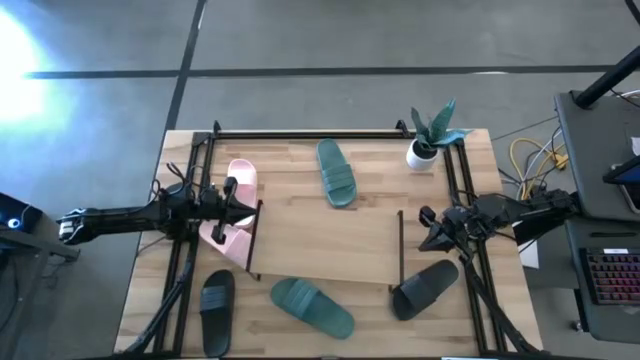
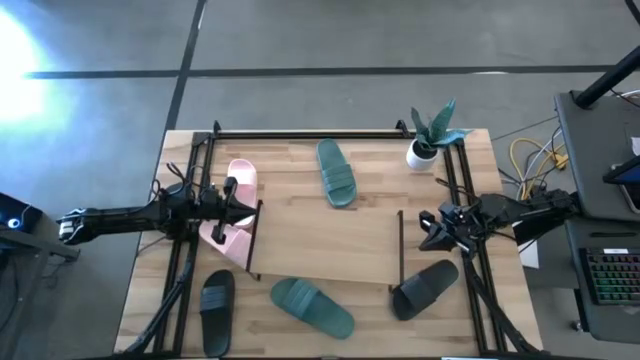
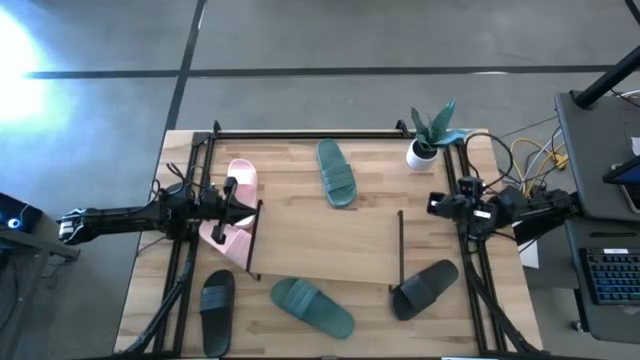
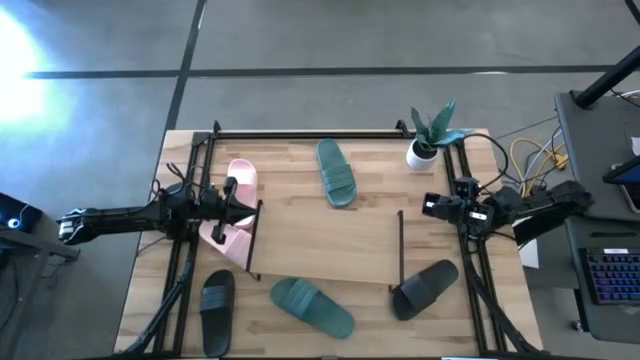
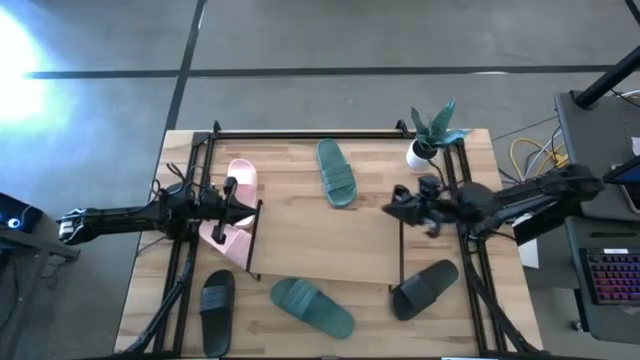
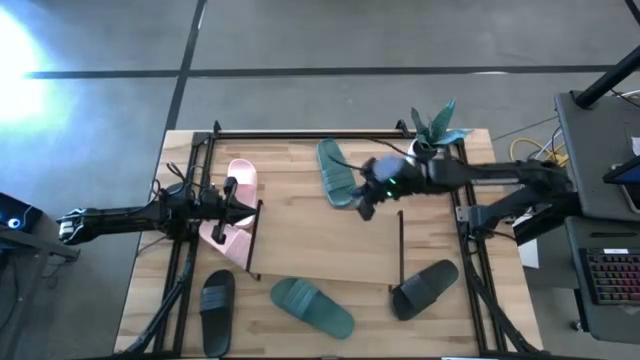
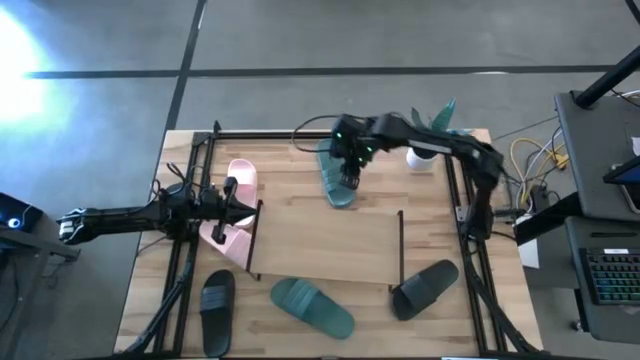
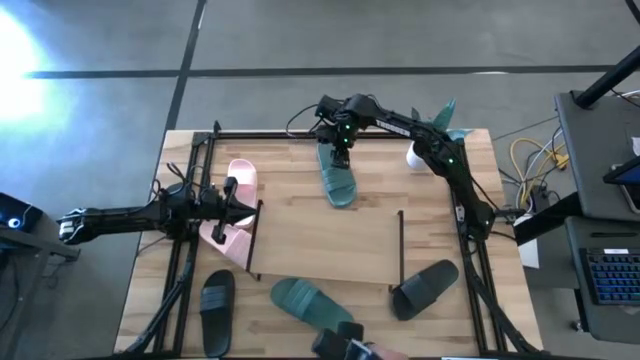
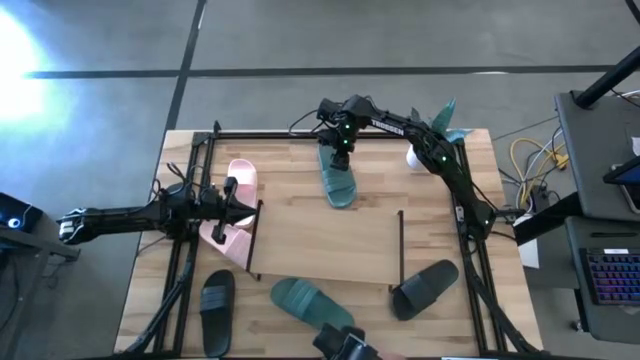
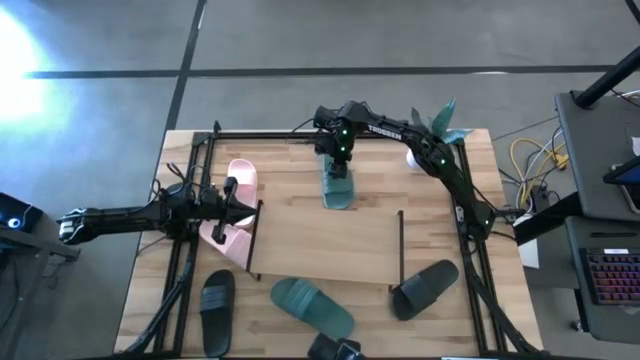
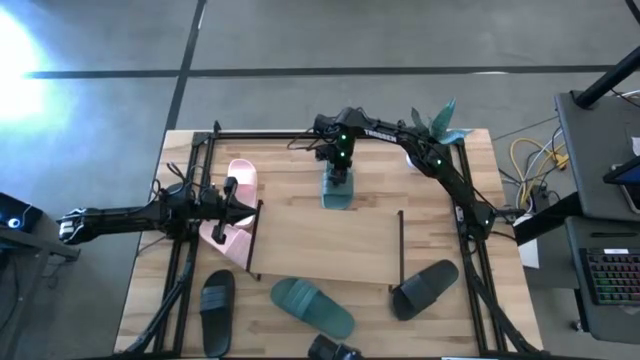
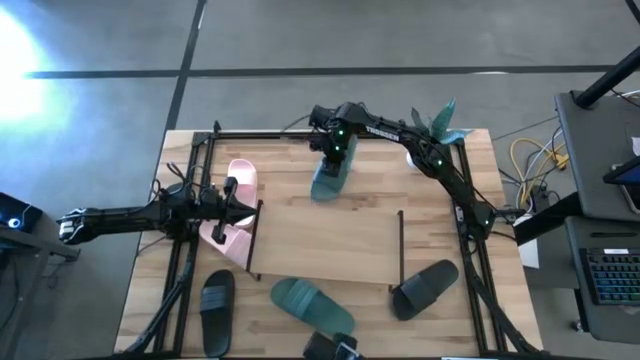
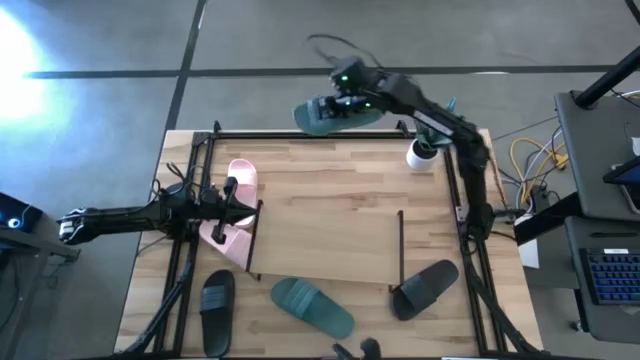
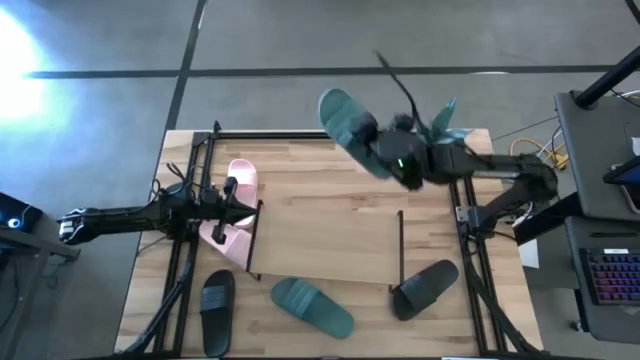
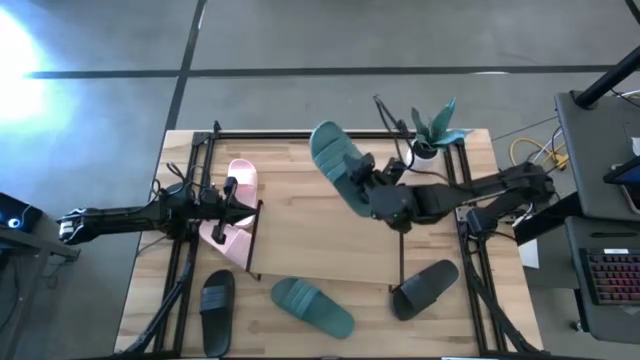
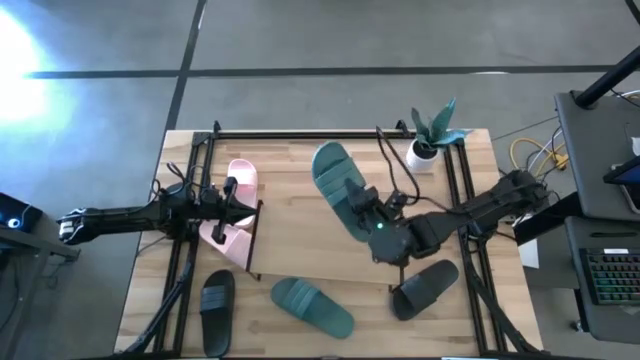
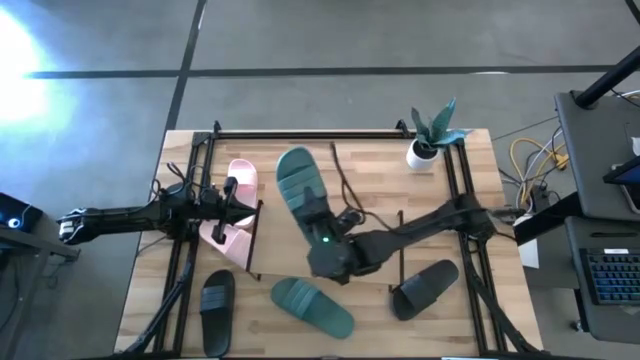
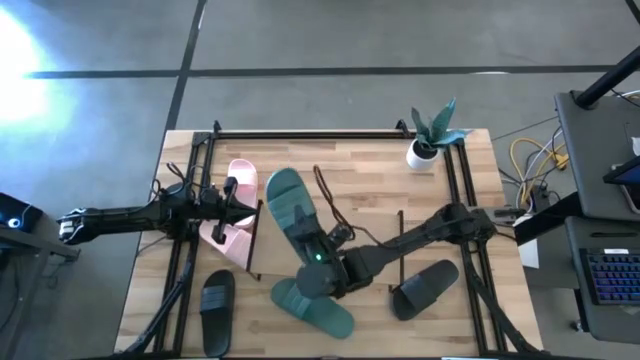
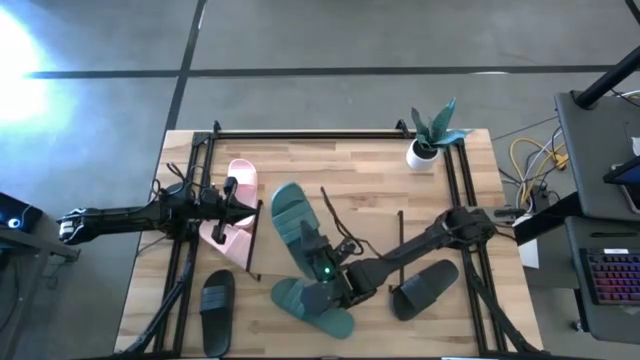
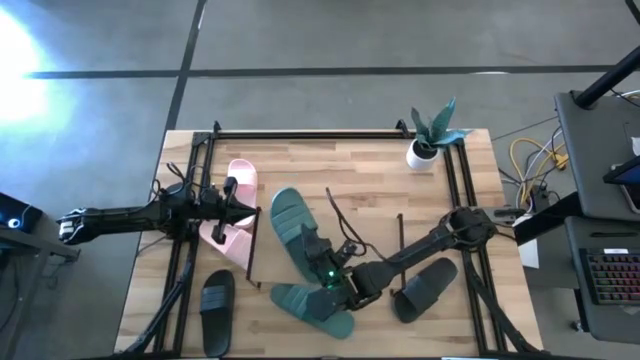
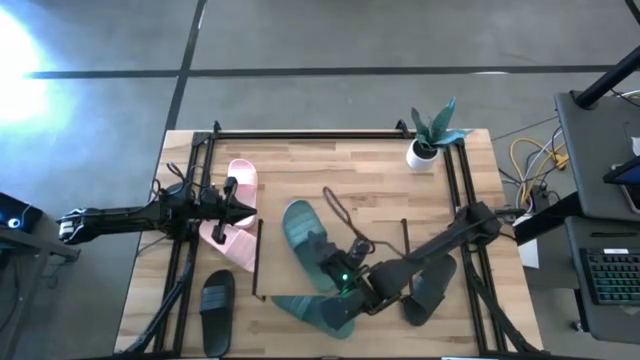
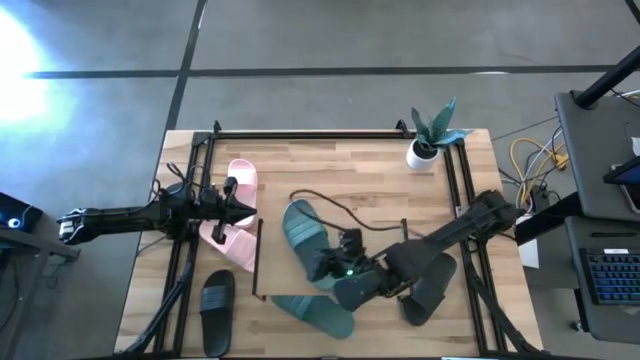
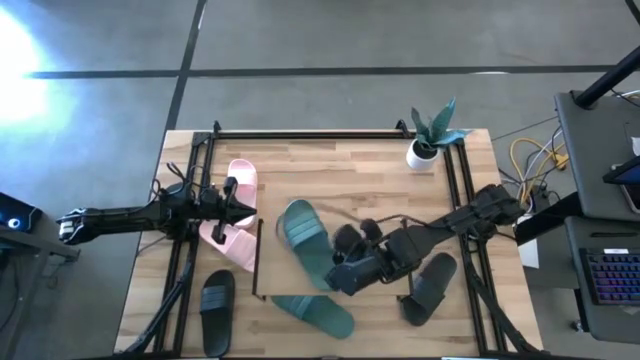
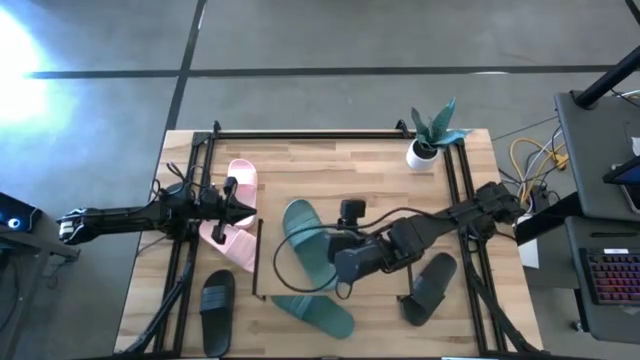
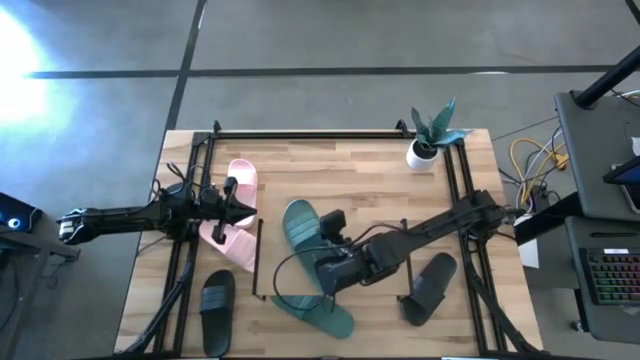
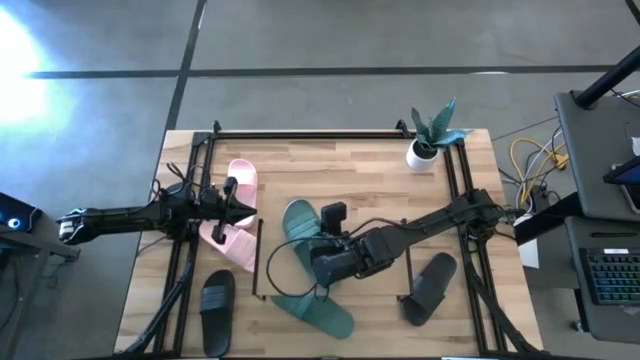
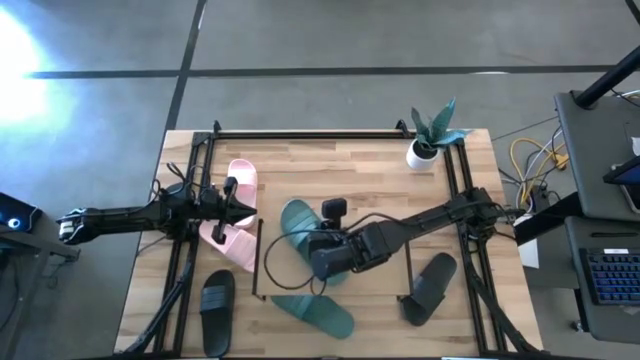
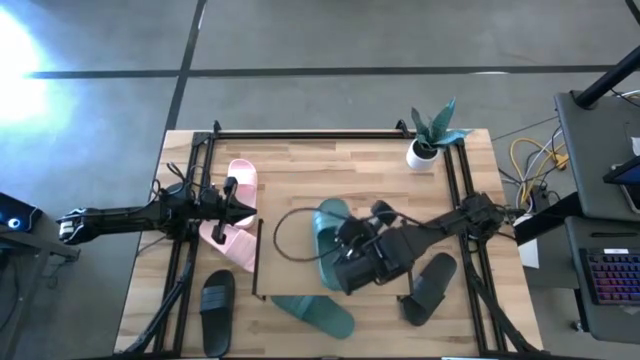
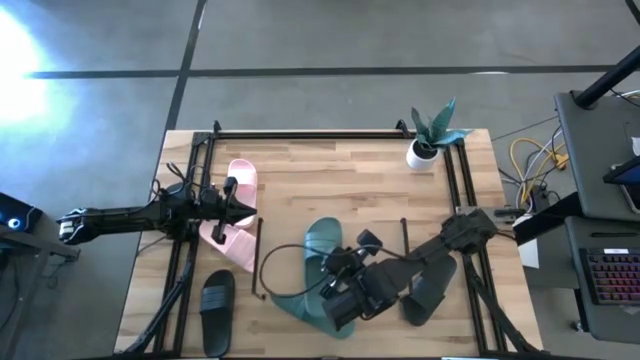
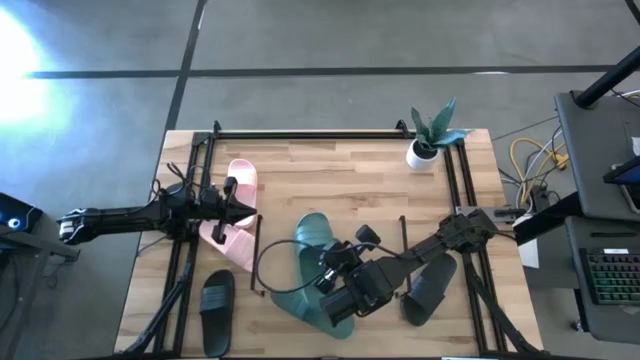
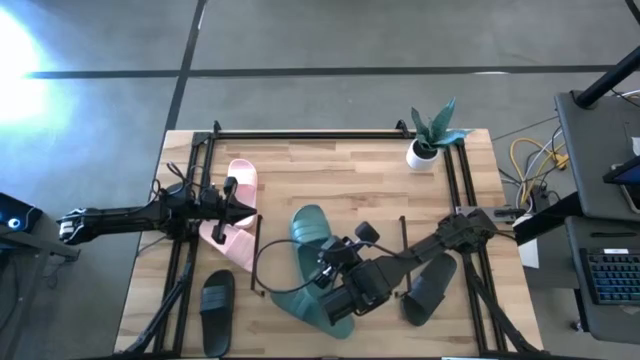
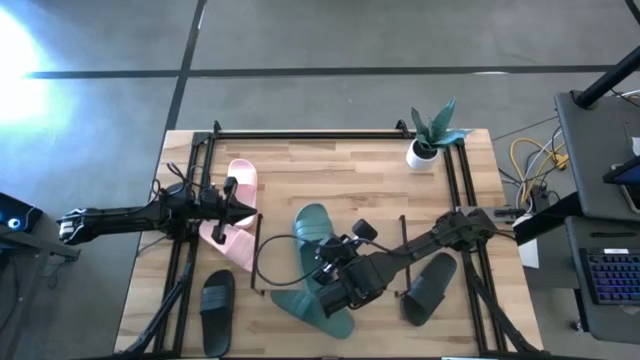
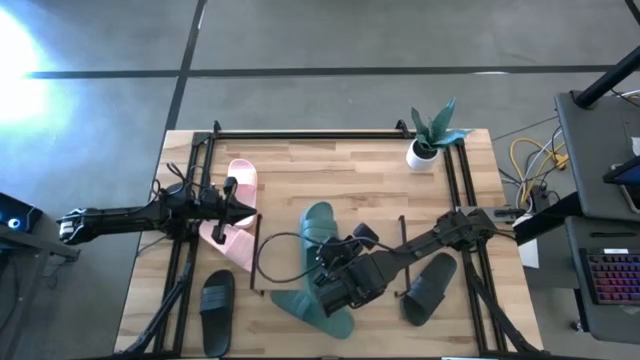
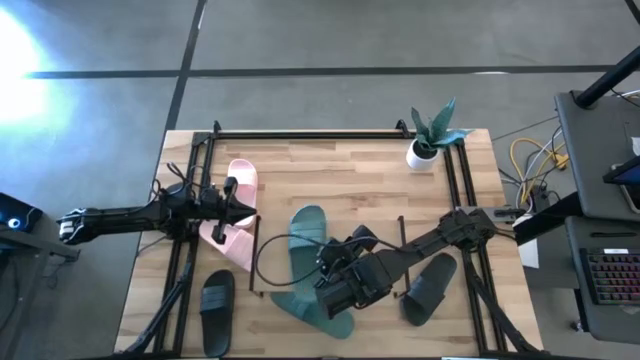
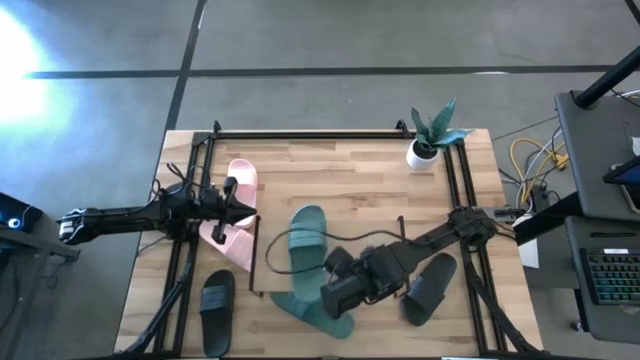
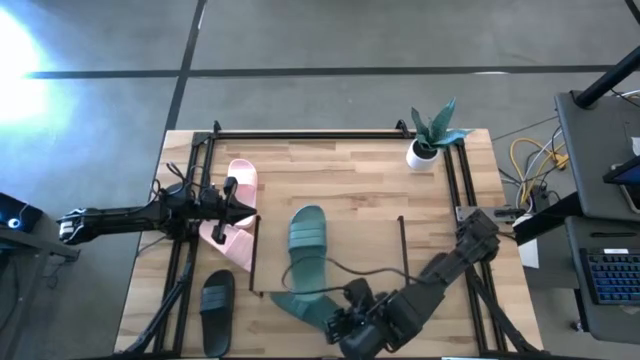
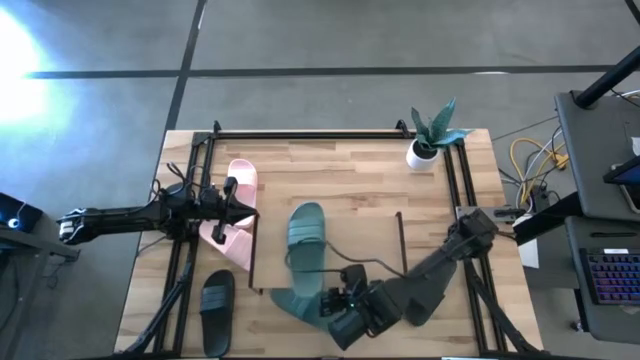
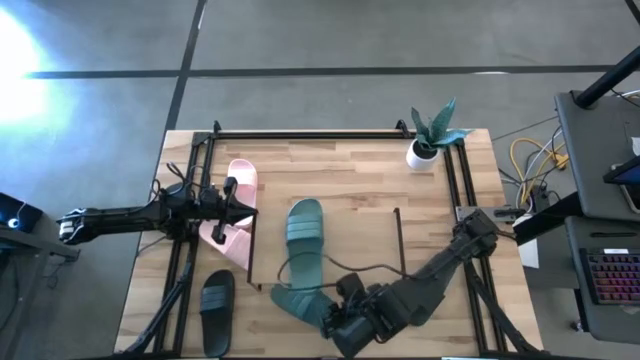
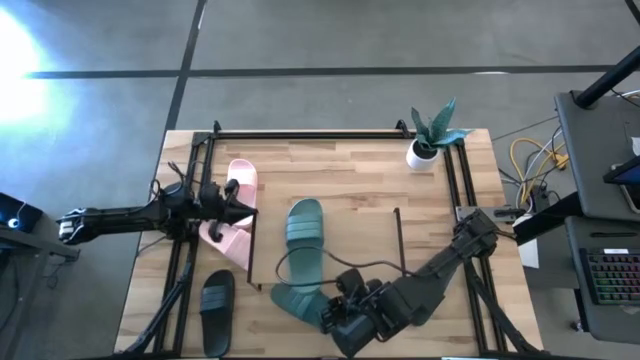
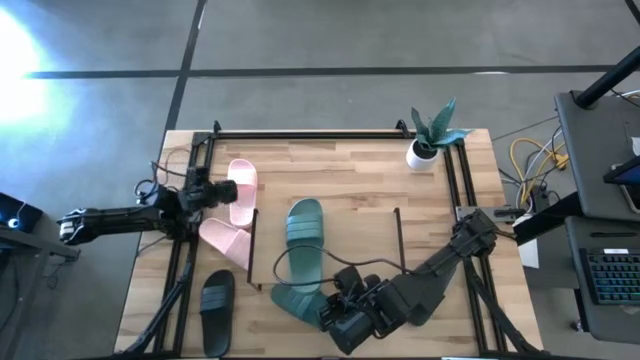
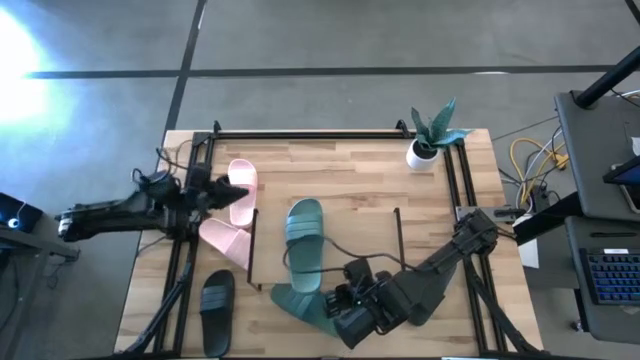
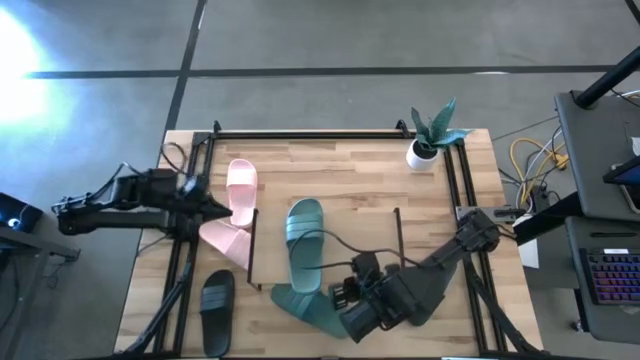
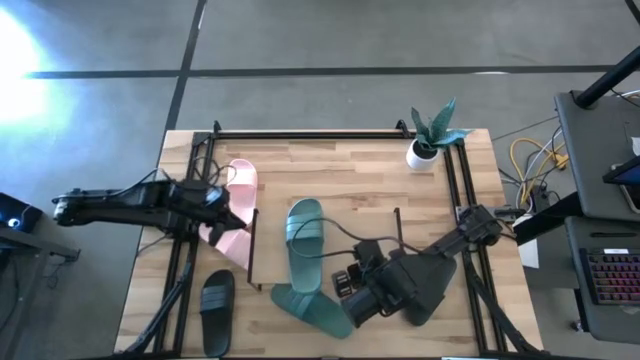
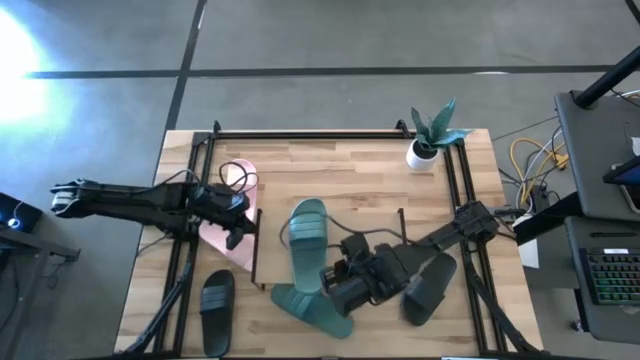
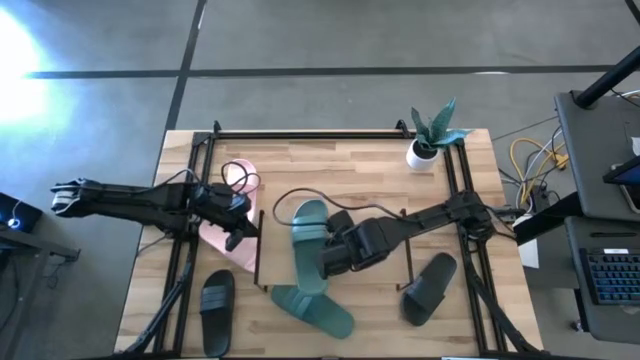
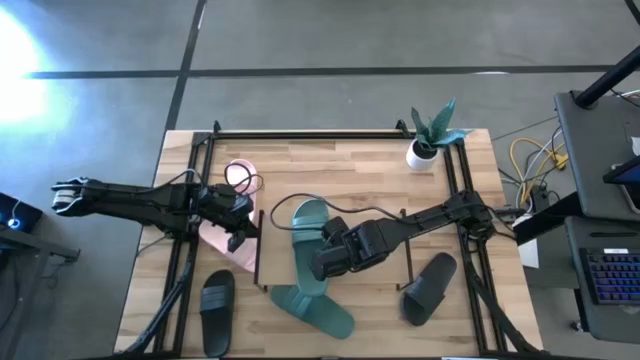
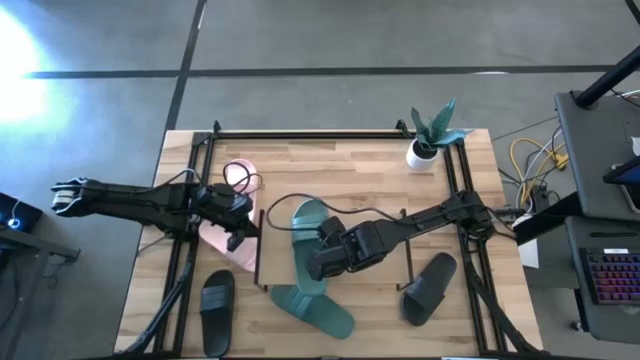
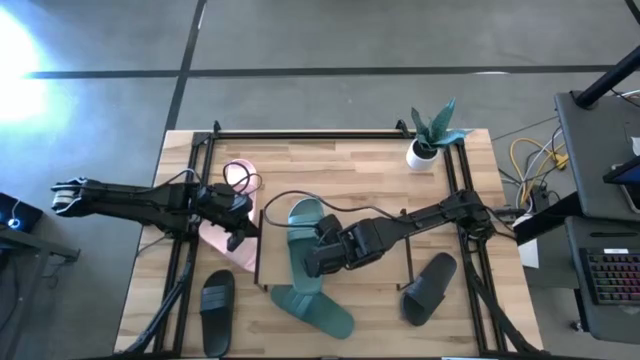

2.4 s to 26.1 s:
Task: Pick and place slides into the shelf
Put the top green slide on the shelf
